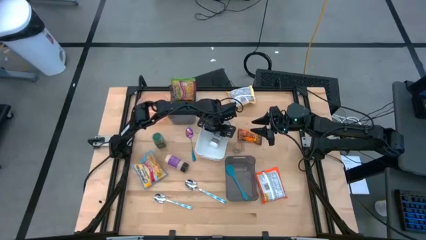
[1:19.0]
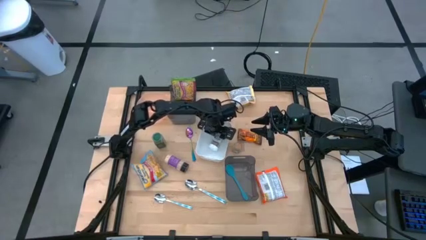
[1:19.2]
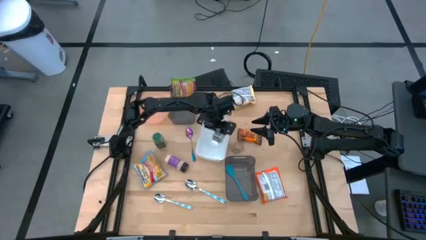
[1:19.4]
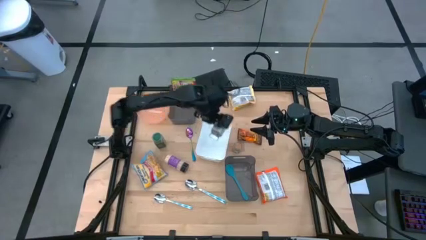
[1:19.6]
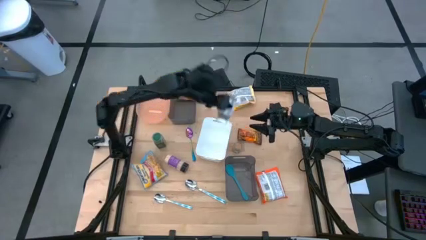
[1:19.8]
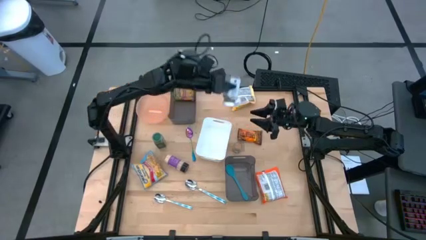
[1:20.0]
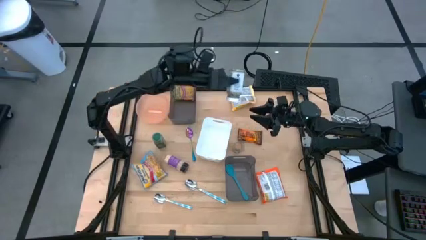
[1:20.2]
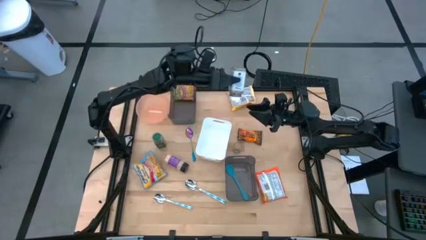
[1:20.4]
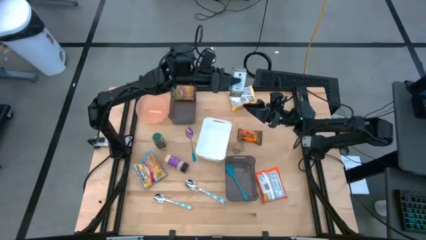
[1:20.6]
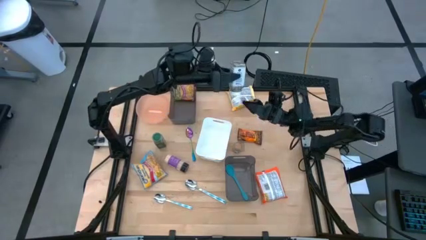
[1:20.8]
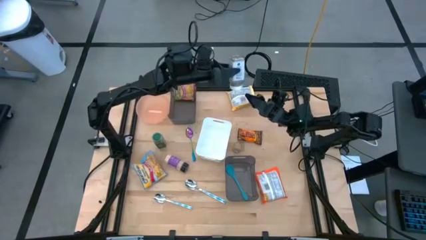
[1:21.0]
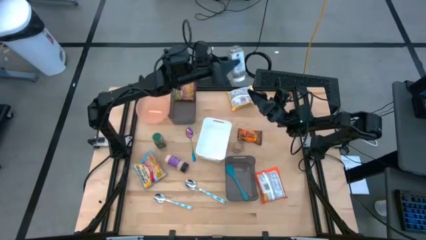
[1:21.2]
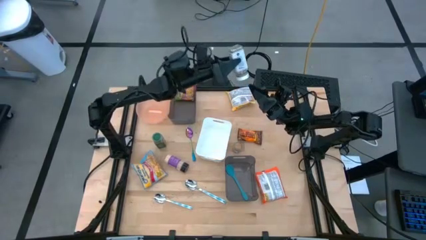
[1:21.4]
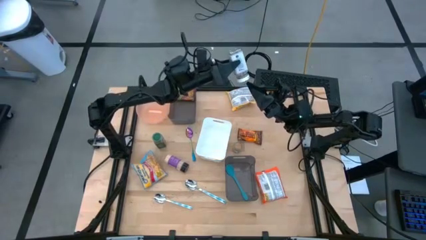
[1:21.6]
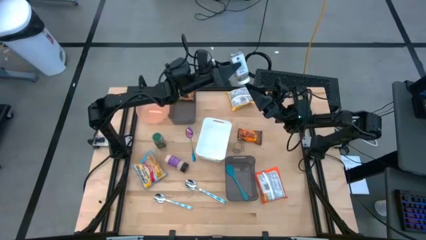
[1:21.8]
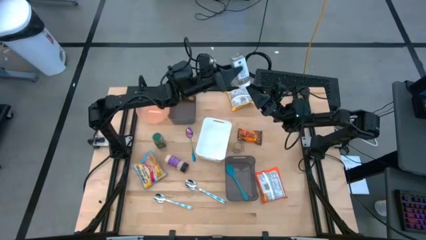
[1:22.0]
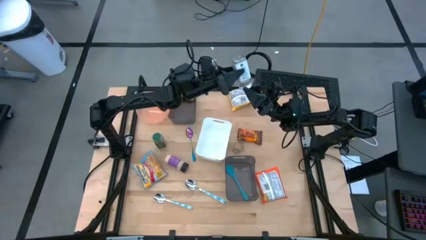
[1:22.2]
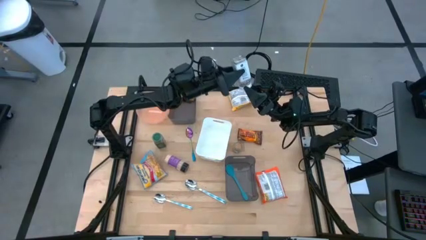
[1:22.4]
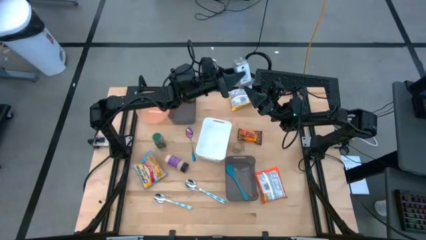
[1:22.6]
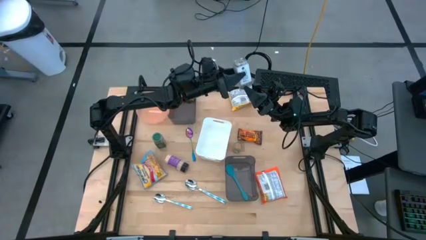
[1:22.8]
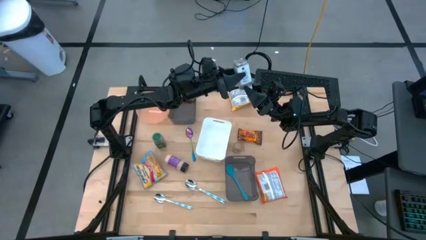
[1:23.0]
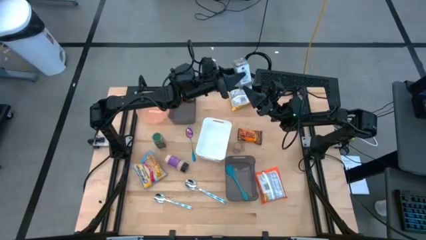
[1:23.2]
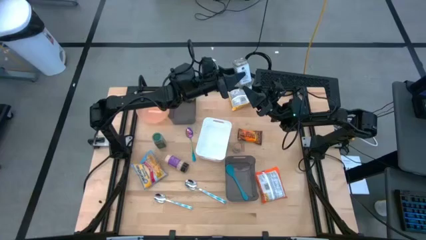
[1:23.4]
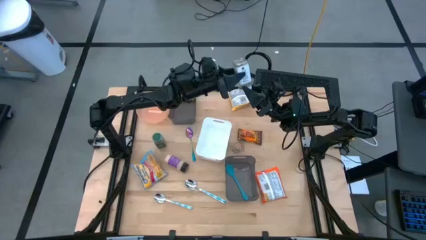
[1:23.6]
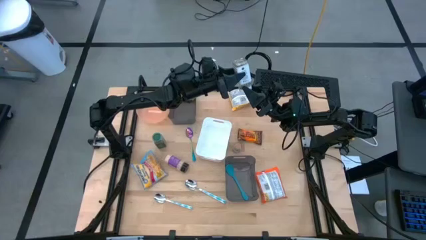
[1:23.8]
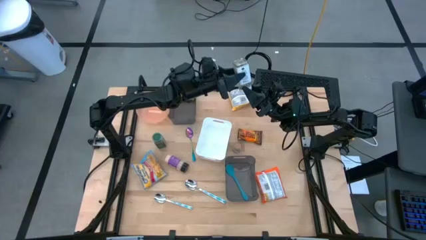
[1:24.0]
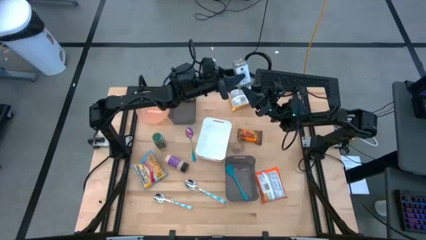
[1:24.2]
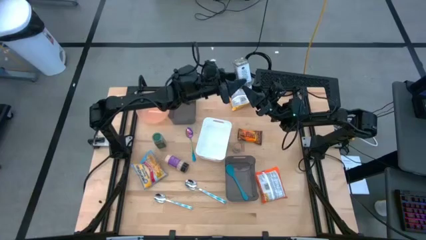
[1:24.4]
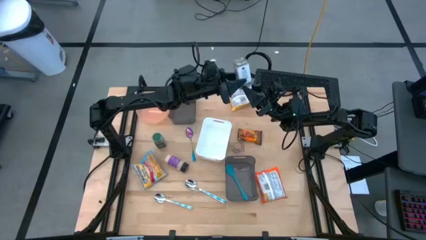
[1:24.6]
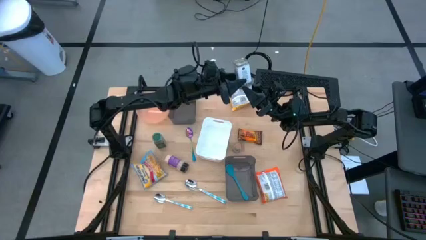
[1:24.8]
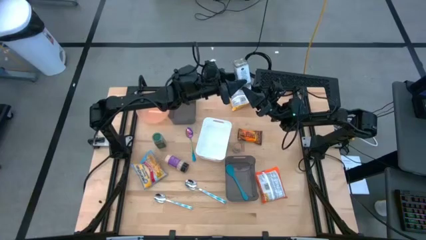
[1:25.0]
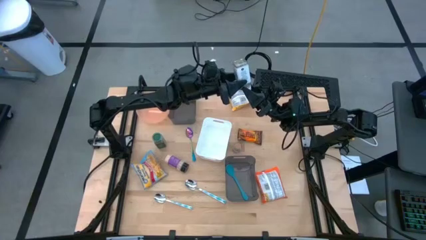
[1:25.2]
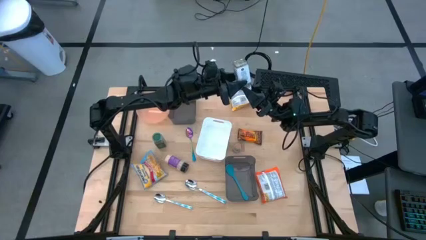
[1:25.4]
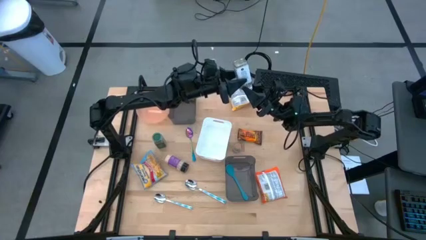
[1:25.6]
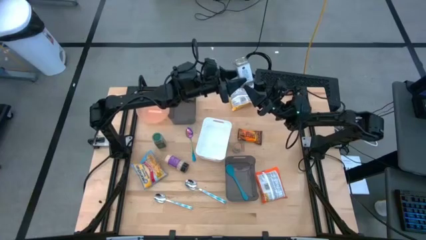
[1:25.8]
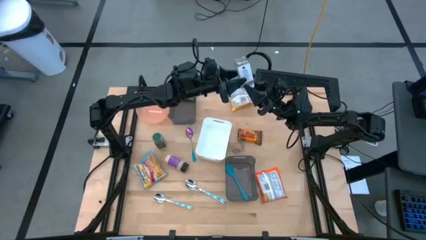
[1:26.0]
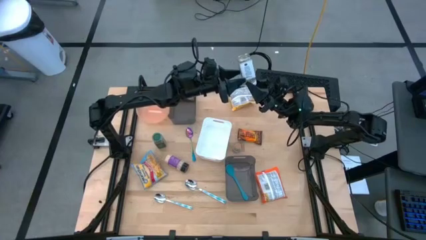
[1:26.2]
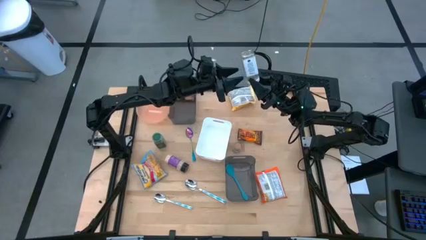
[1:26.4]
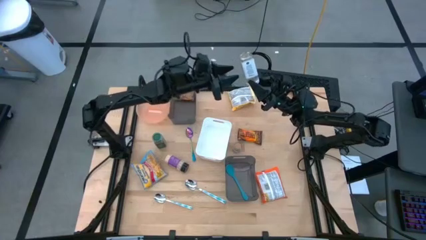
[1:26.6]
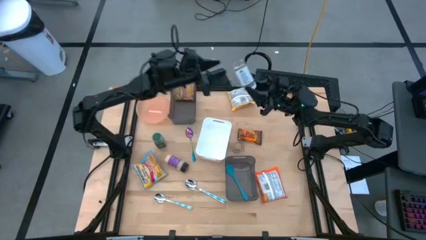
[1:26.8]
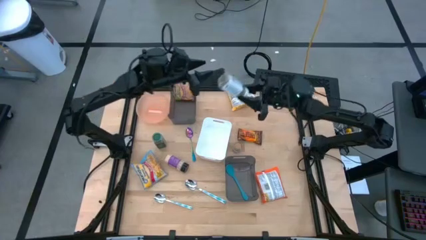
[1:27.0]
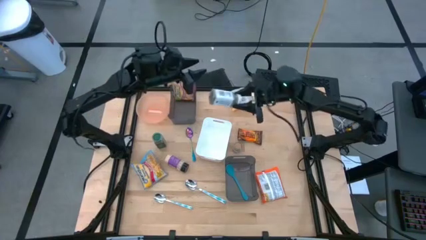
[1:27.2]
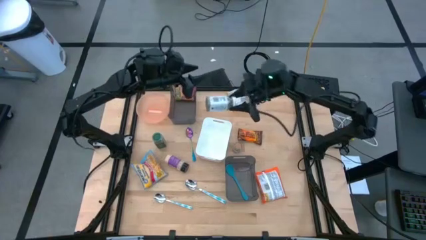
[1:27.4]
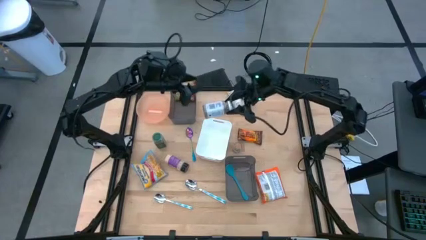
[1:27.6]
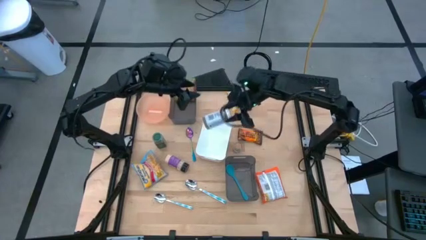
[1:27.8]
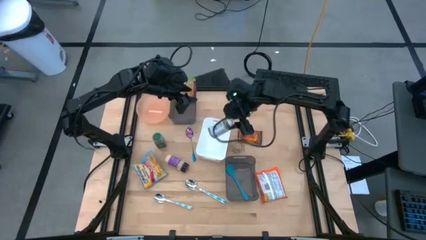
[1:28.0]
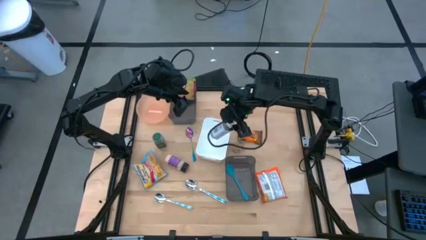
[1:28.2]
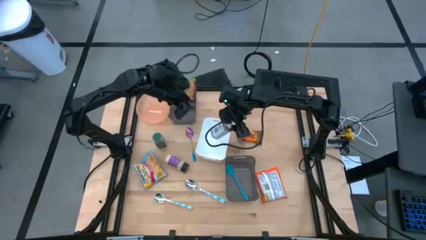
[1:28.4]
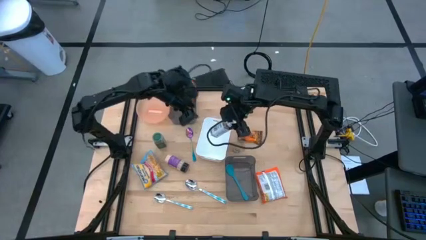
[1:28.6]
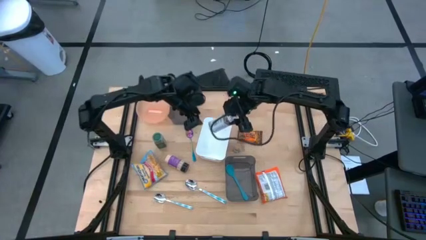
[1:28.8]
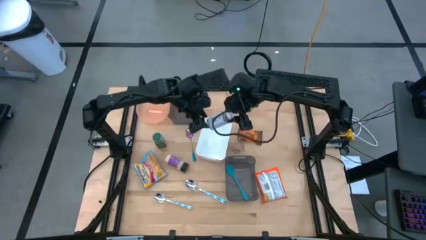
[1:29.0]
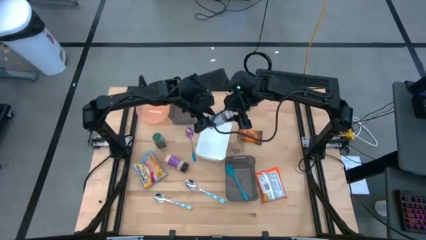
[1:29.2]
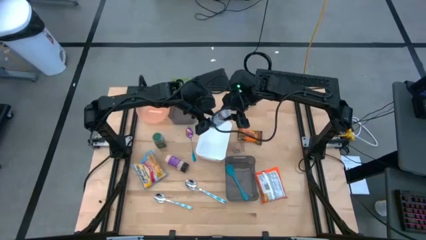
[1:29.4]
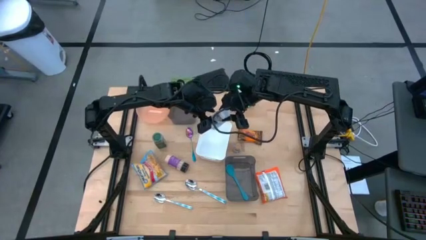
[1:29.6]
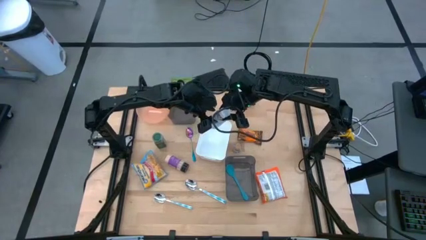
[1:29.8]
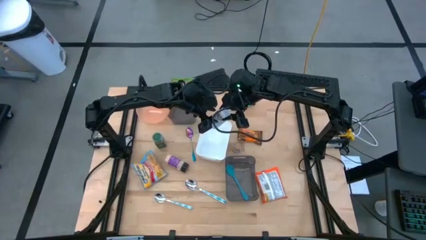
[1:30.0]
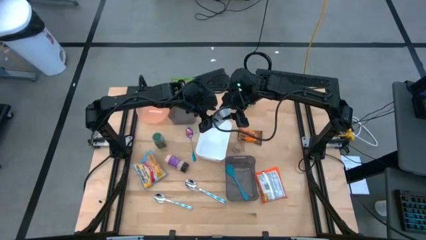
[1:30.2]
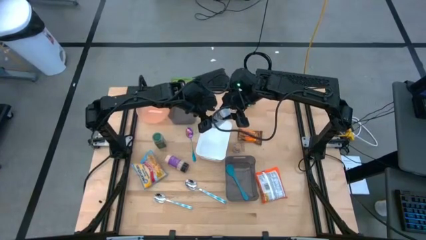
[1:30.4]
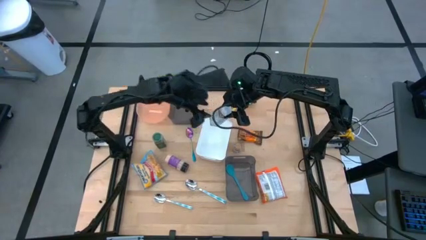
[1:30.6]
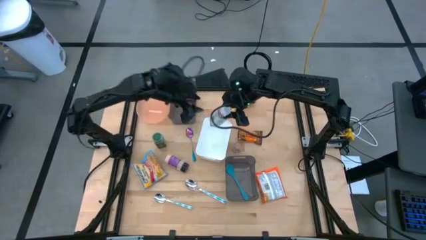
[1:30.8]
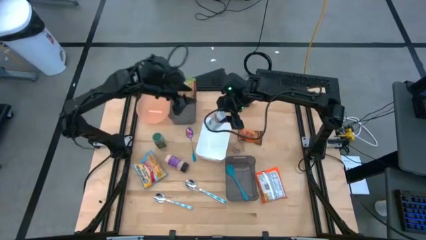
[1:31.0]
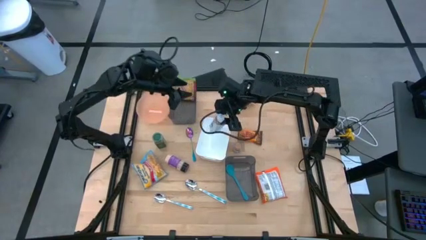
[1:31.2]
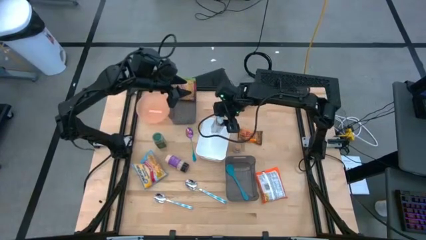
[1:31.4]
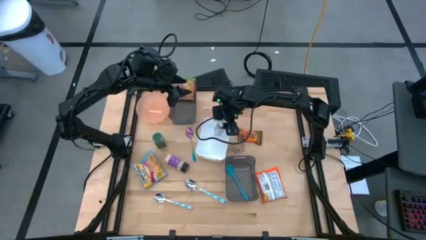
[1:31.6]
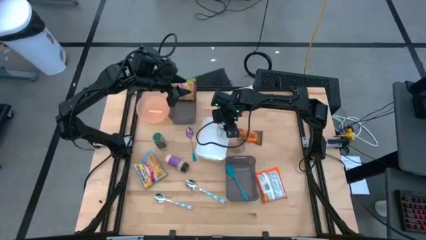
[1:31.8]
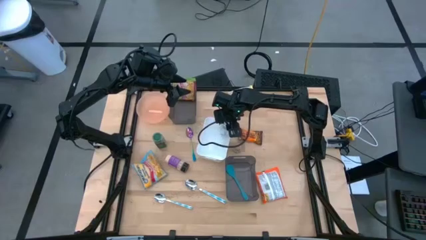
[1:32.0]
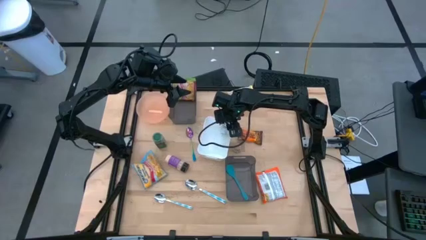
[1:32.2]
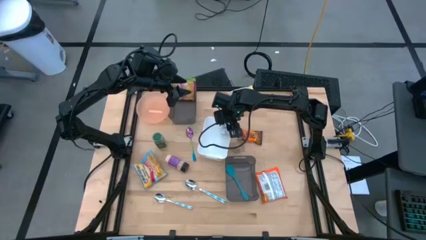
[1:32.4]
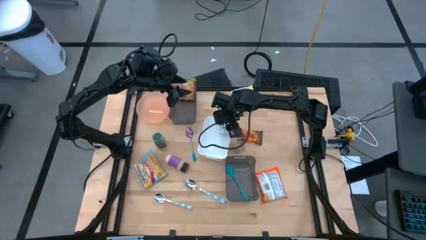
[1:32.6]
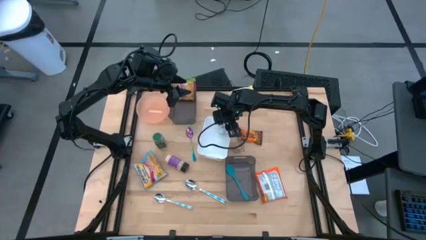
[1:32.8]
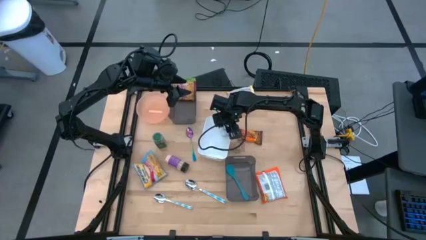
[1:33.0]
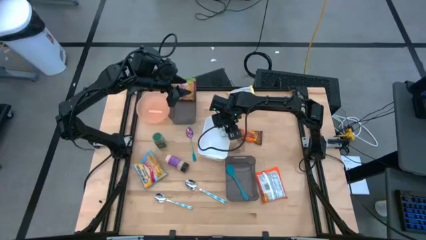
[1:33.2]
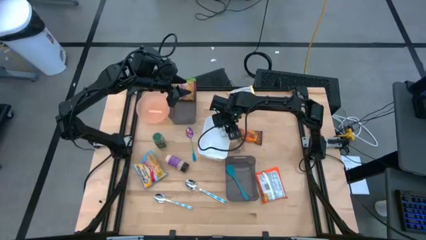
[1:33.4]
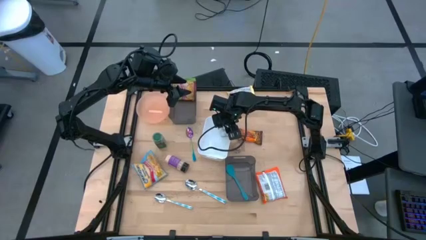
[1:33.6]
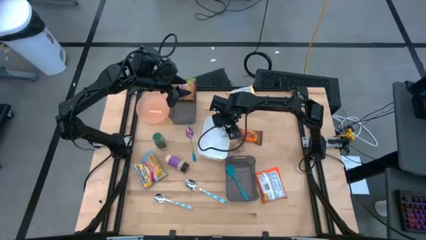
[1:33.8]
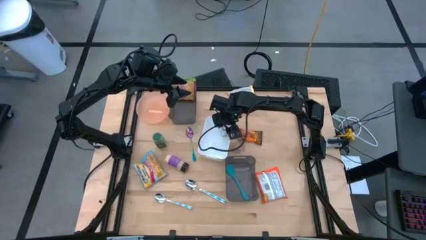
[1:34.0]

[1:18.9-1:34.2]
Task: Pick & Place Food Item
Put the white seasoning bottle into the white bin
